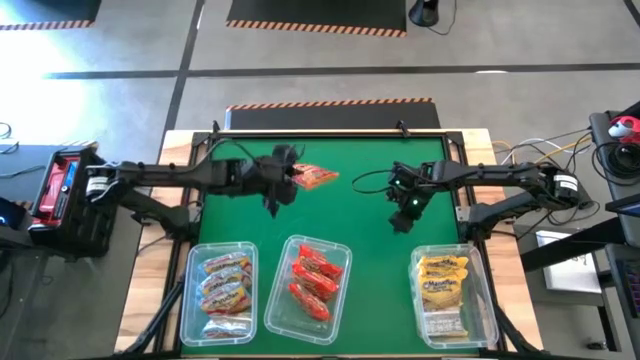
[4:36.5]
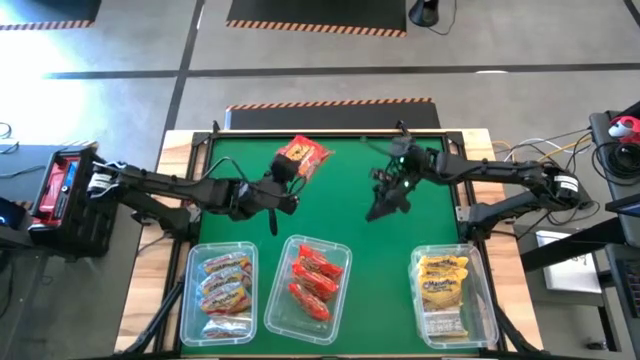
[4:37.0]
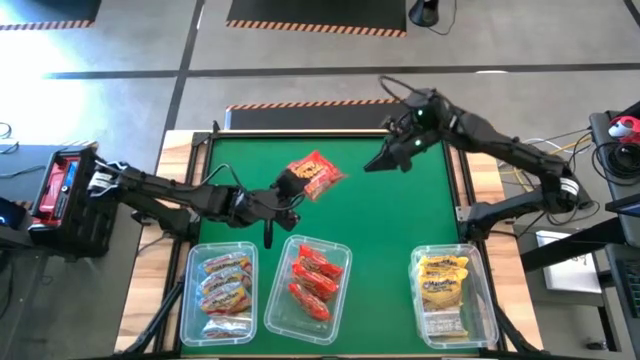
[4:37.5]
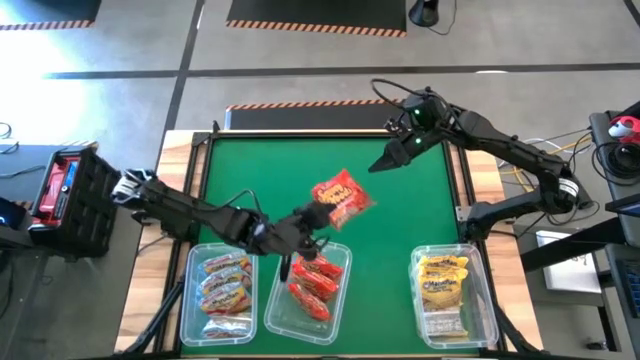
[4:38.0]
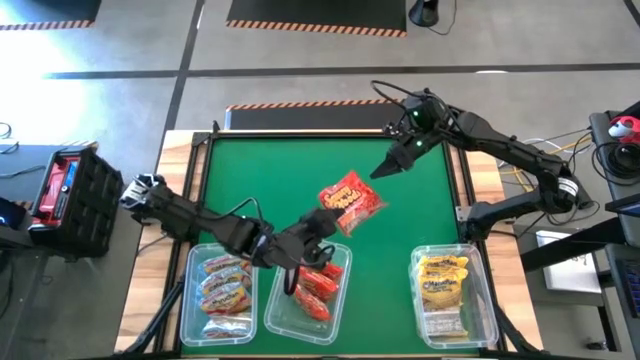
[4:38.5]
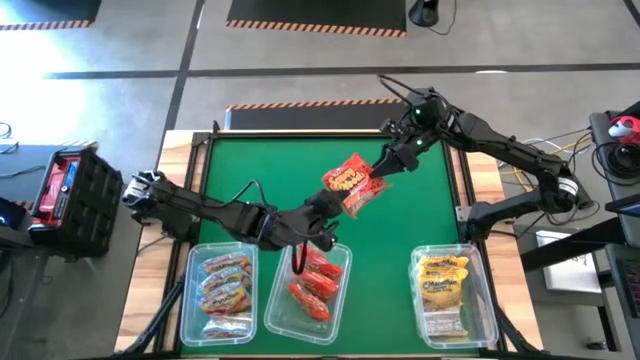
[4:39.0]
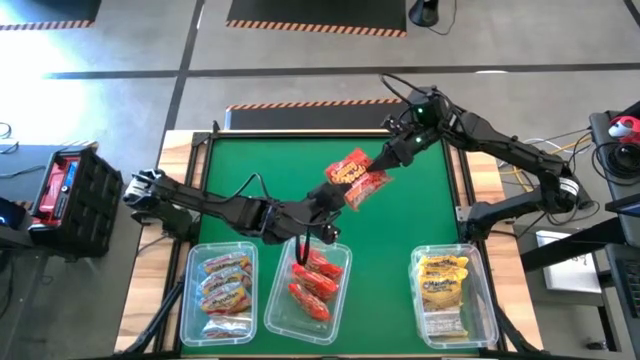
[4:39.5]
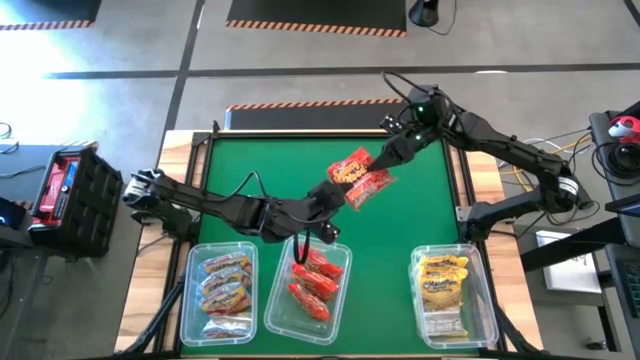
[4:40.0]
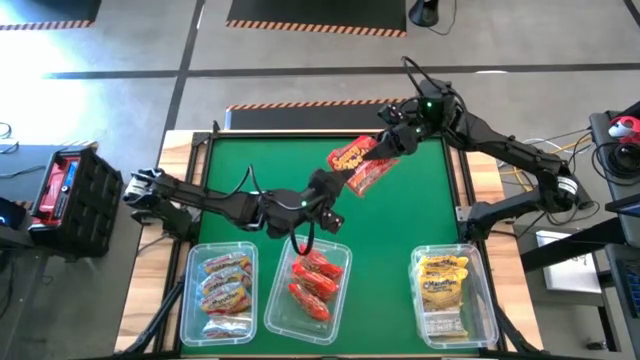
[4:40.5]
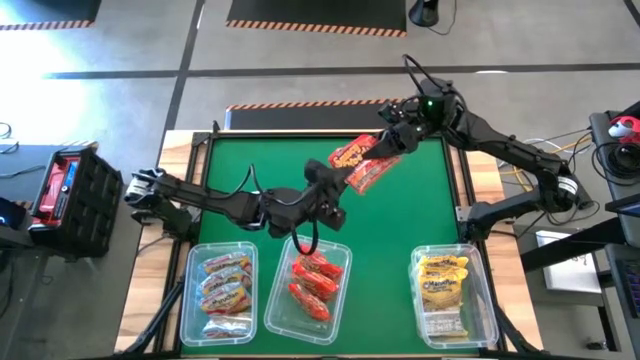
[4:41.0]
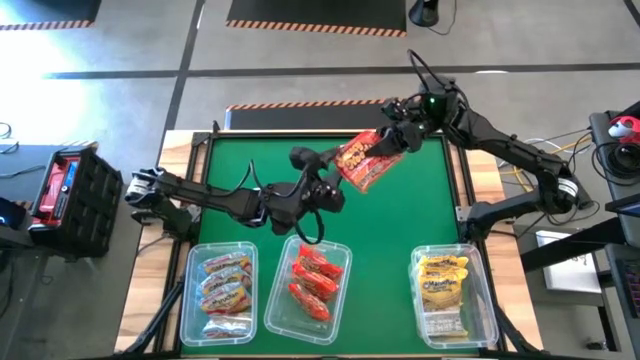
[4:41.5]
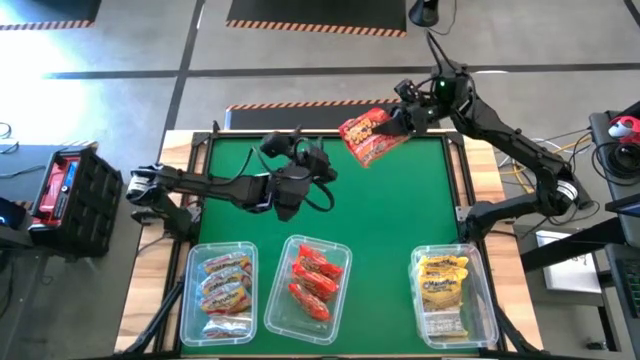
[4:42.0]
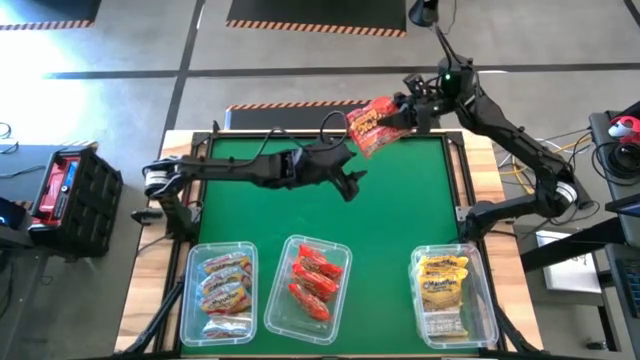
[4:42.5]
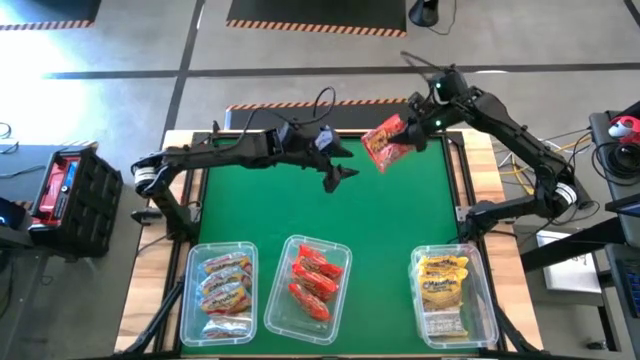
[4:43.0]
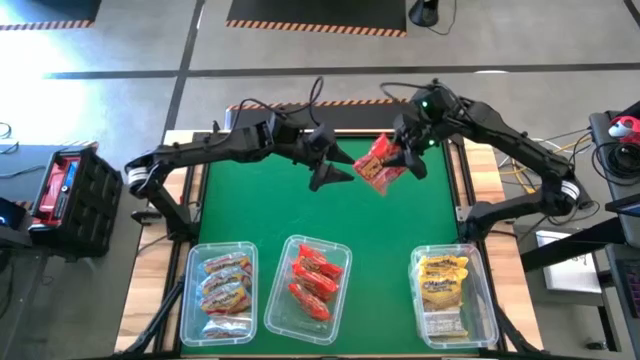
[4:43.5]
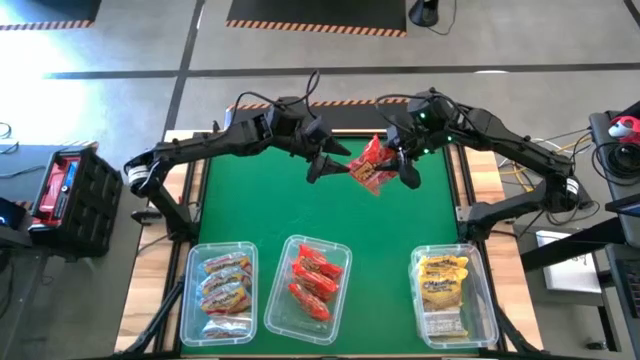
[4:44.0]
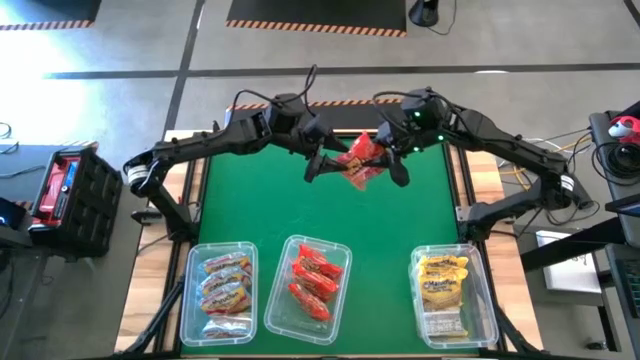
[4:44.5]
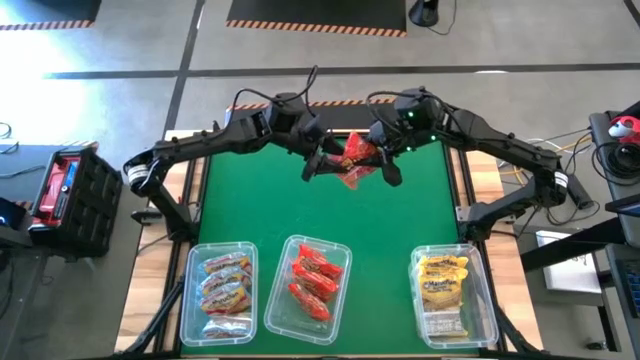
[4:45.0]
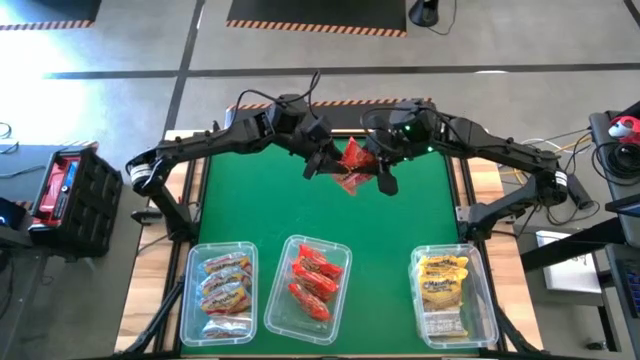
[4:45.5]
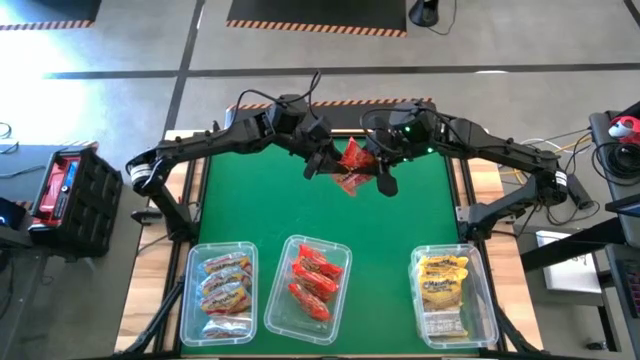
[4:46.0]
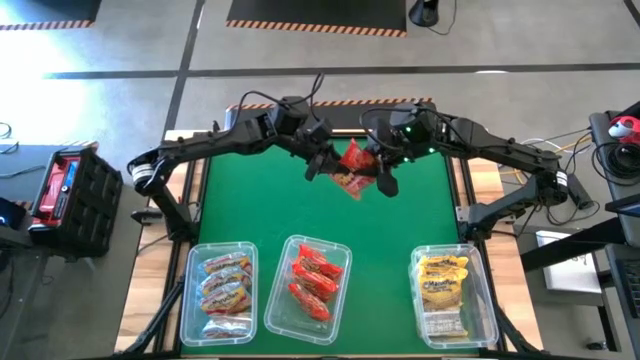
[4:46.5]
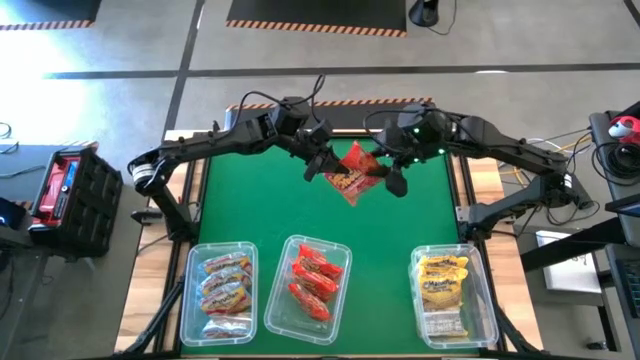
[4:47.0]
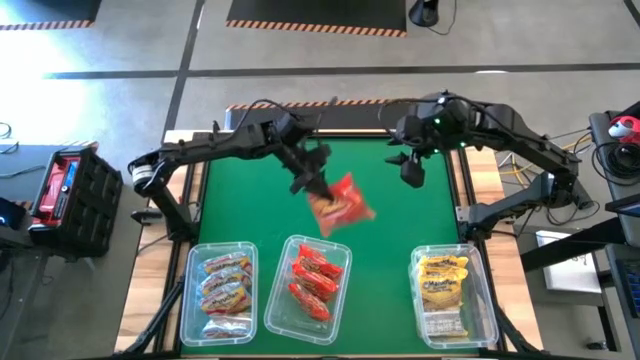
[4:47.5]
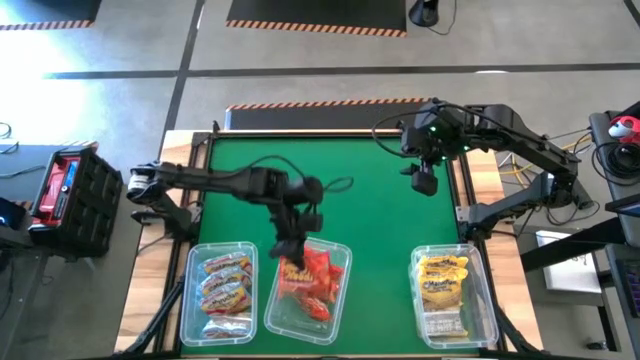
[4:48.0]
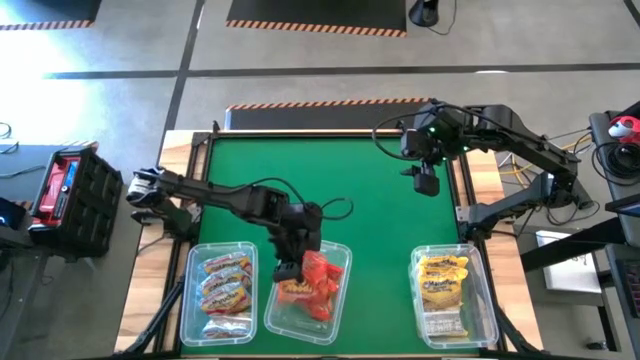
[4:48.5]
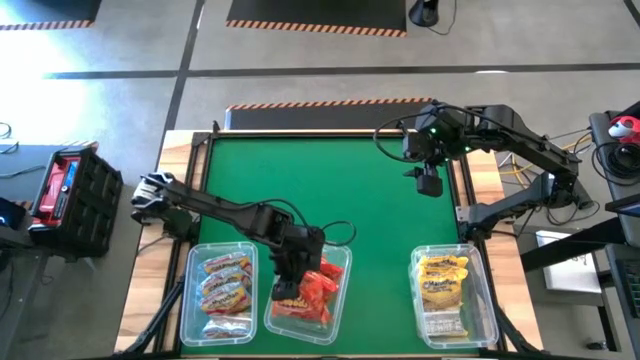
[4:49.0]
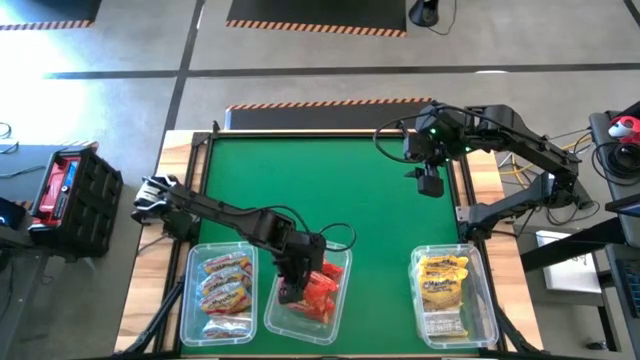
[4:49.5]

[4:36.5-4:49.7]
Task: Sort Maruchan noodles
Put the orange noodle pack into the middle transparent bin

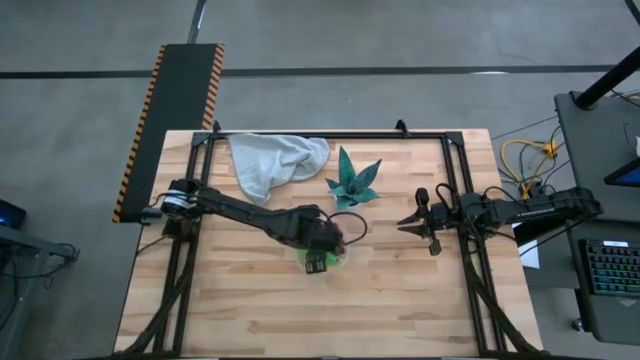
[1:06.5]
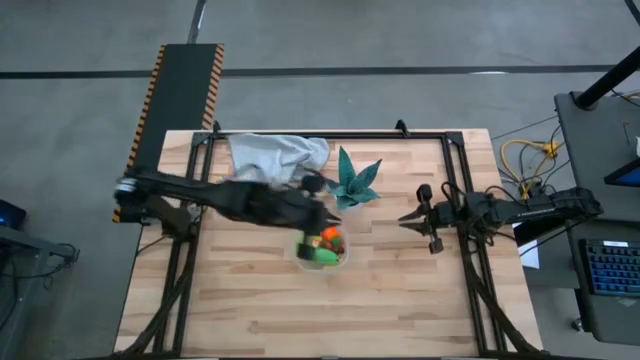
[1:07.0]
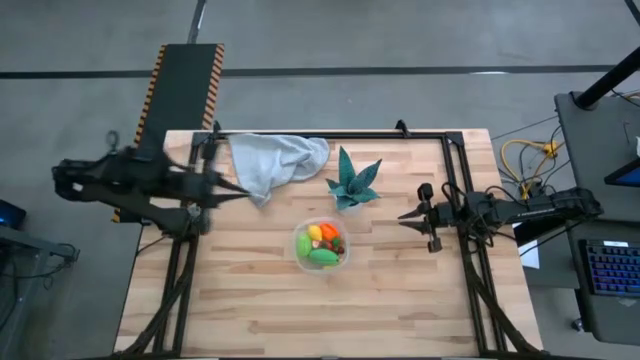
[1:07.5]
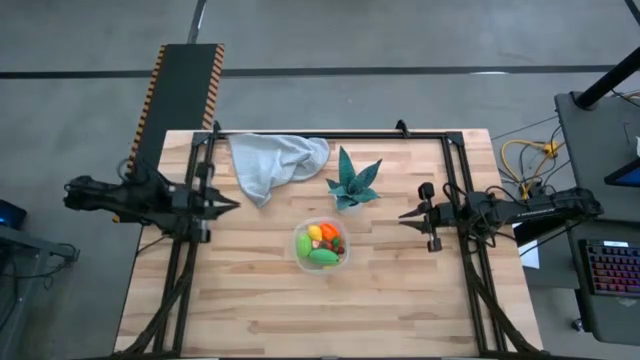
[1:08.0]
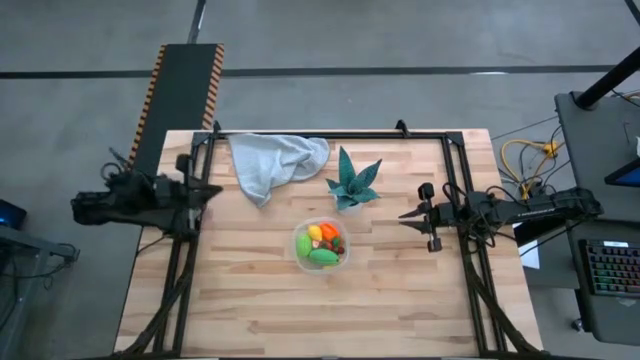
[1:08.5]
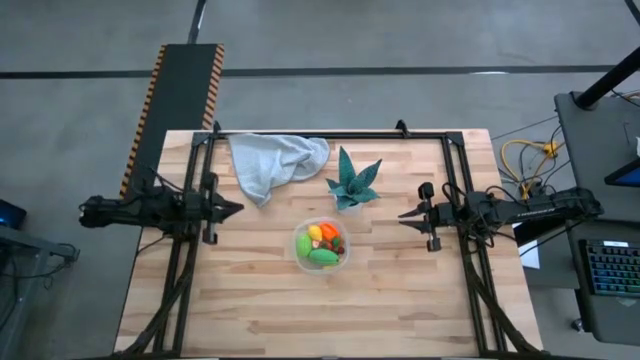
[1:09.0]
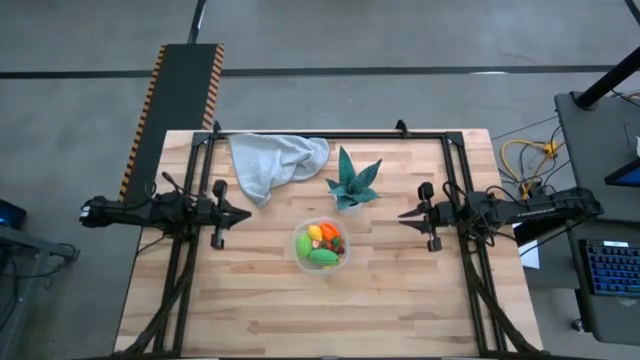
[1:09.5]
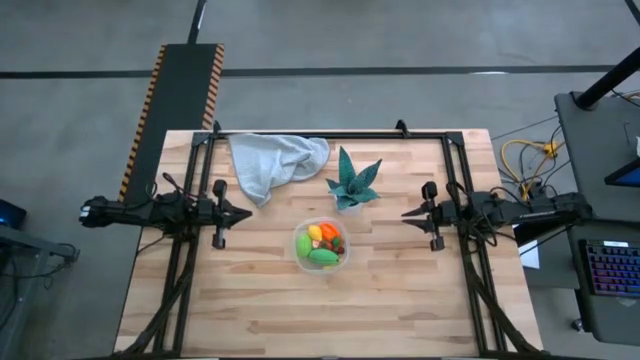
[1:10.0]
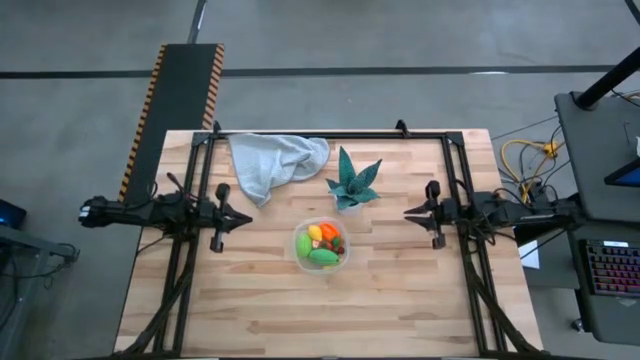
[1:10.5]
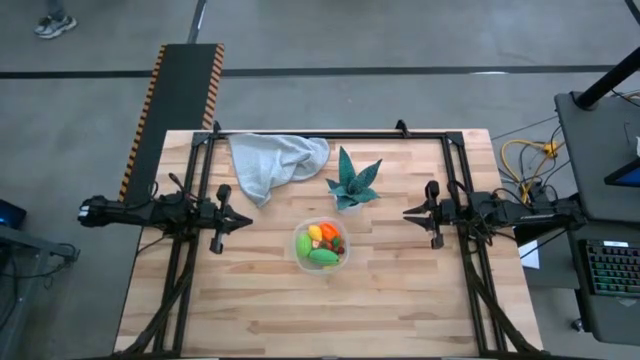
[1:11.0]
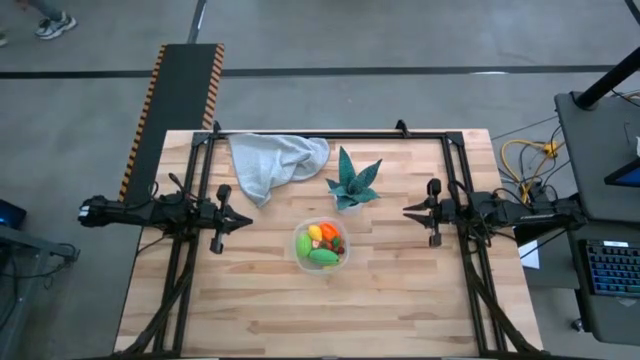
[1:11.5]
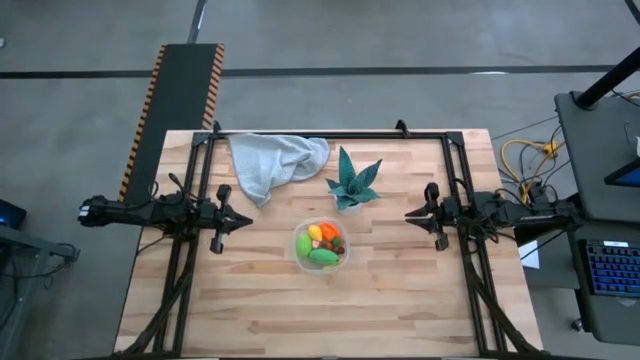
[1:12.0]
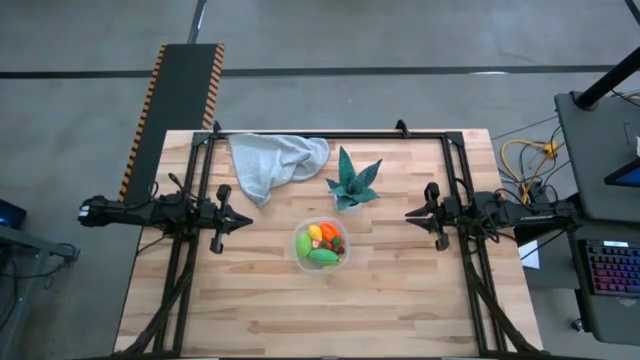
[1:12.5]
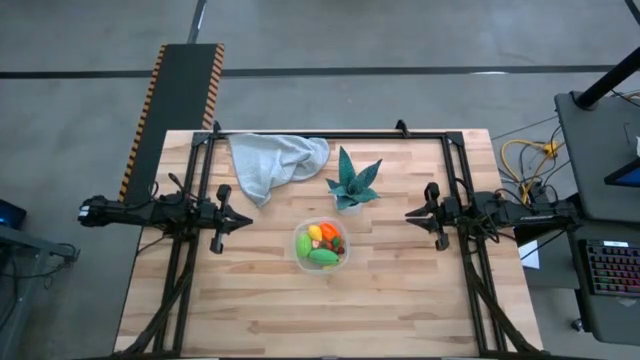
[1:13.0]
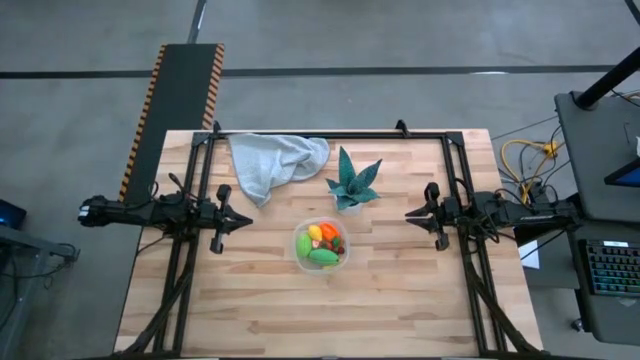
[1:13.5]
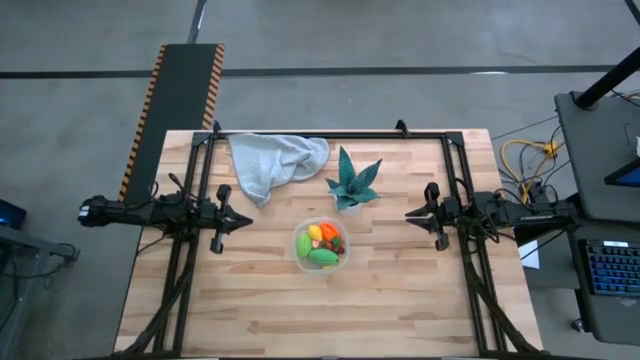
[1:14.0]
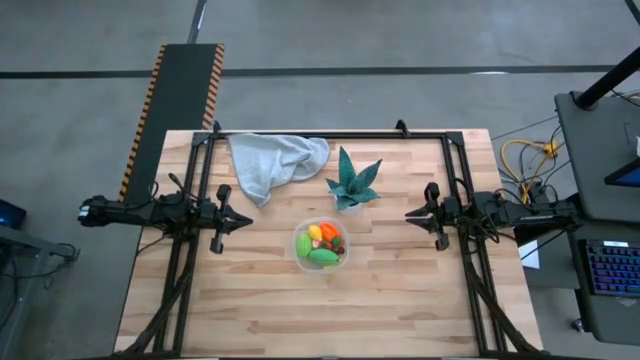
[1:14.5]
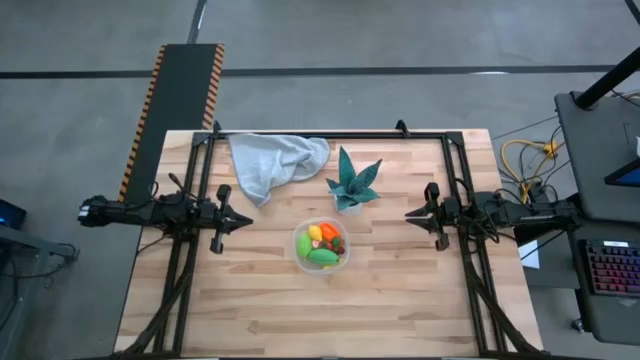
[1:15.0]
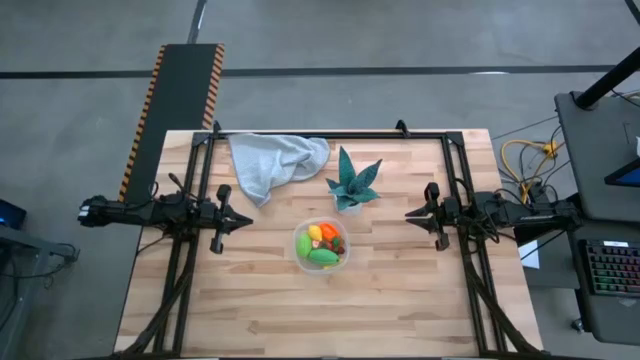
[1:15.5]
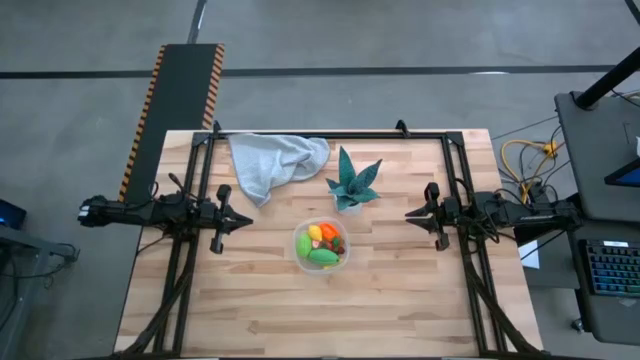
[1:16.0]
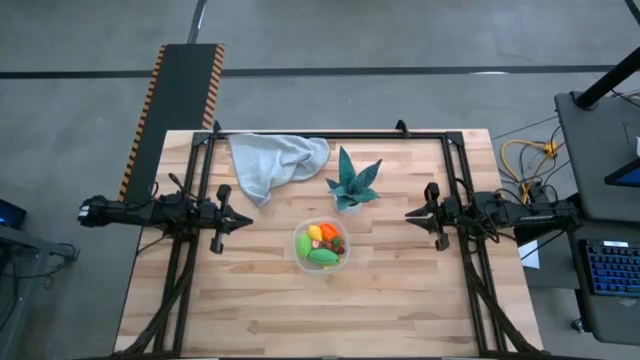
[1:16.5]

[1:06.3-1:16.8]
Task: Pick and placing Produce into tupperware
Return to Home Position
